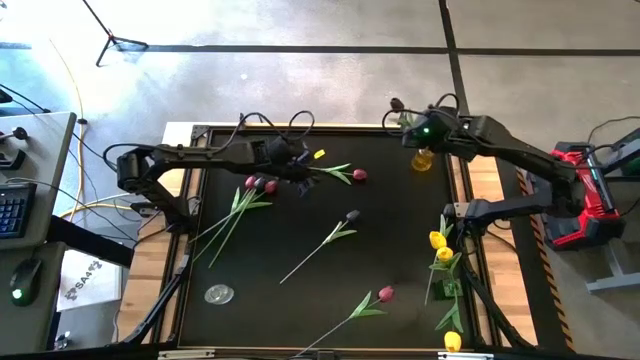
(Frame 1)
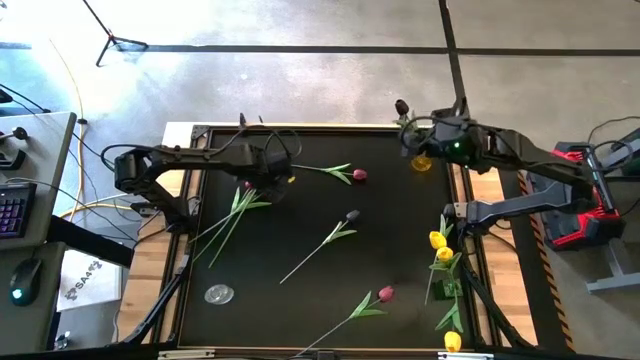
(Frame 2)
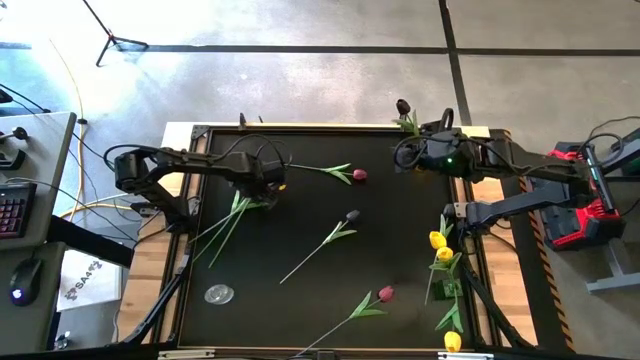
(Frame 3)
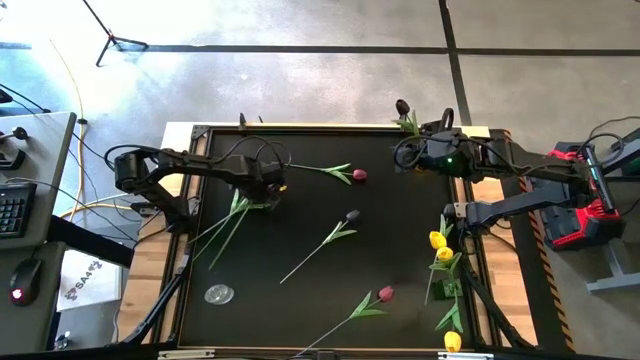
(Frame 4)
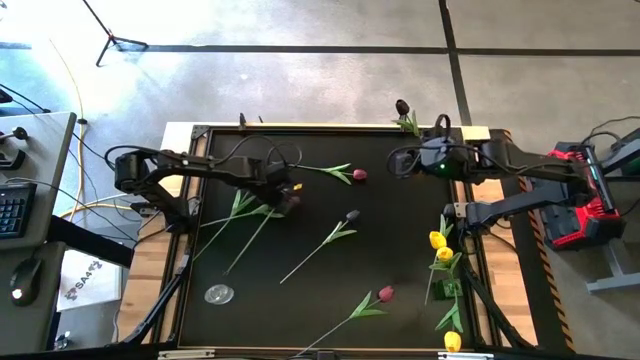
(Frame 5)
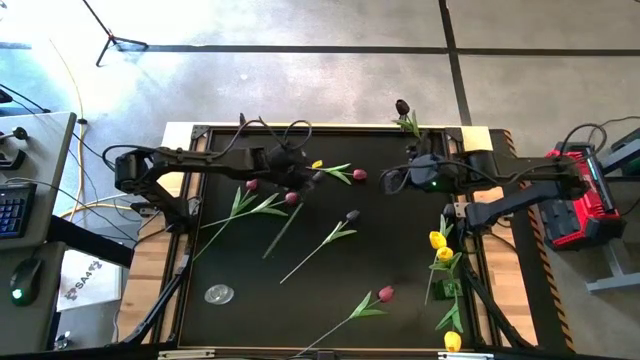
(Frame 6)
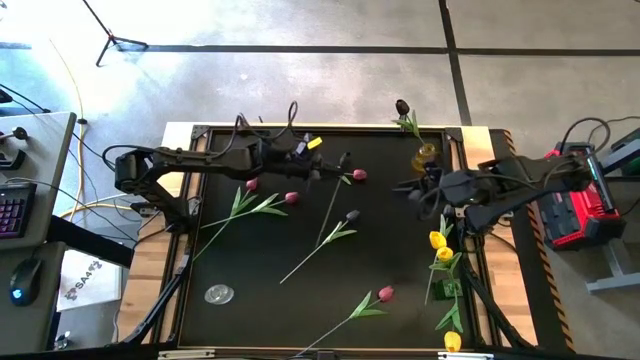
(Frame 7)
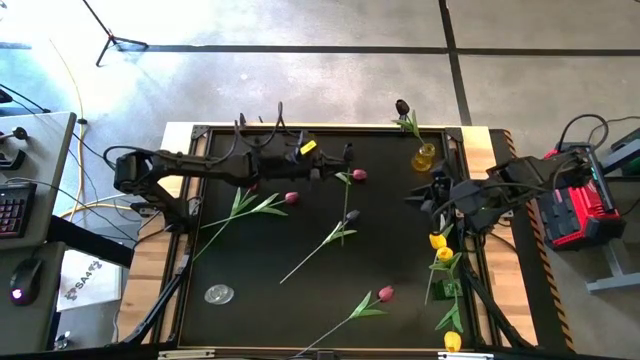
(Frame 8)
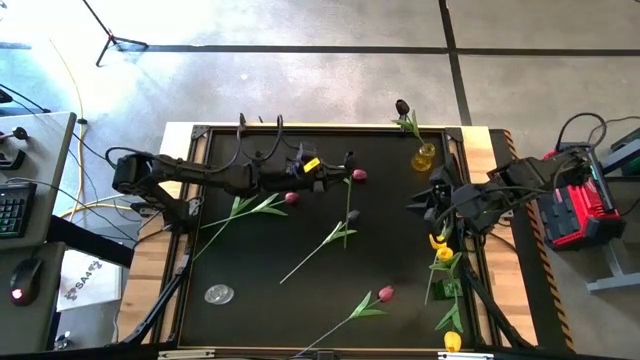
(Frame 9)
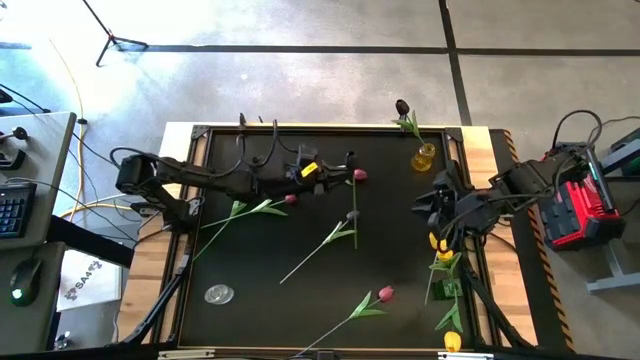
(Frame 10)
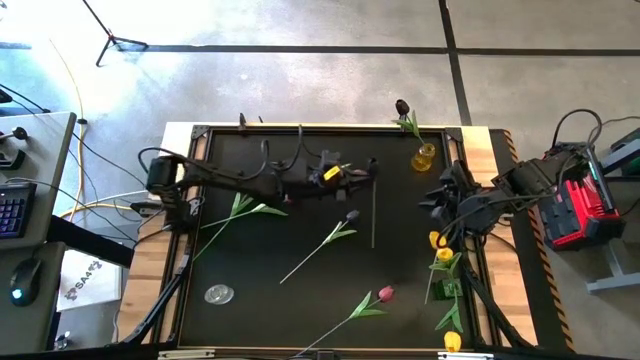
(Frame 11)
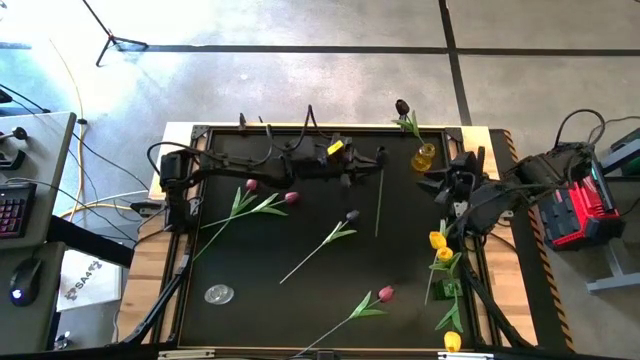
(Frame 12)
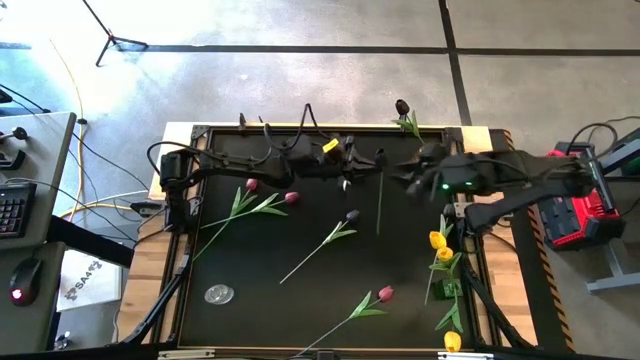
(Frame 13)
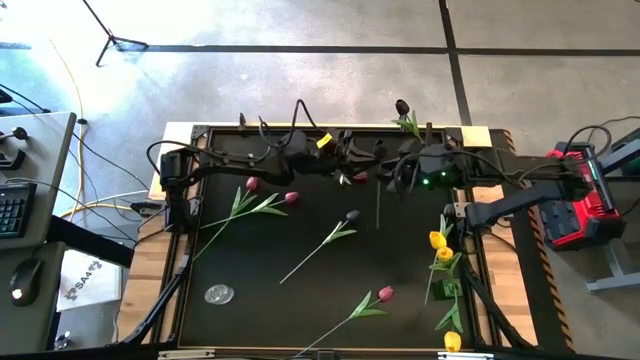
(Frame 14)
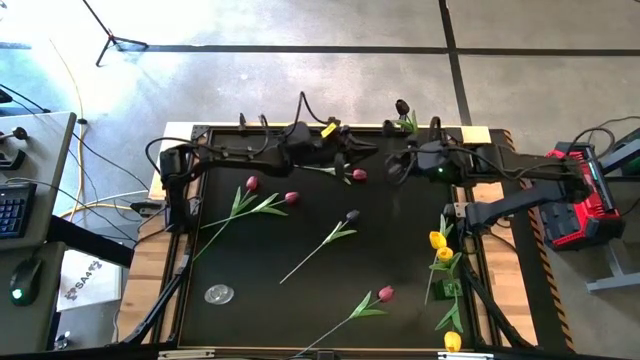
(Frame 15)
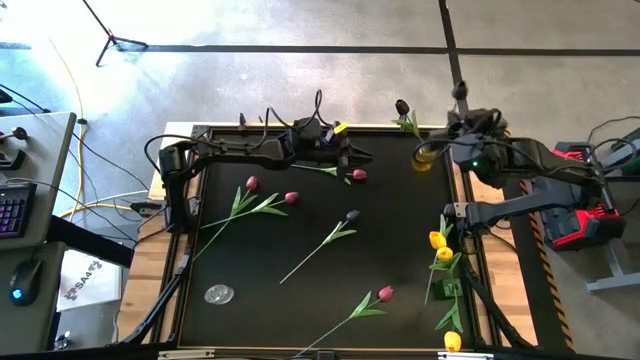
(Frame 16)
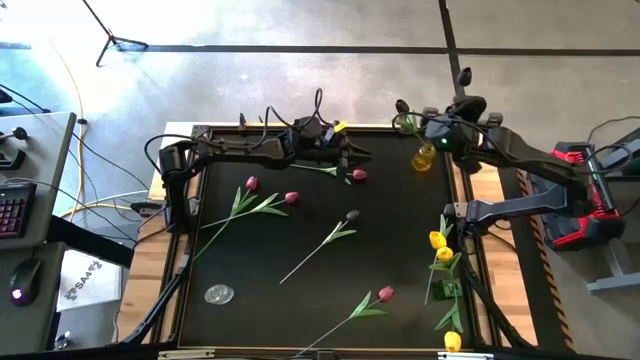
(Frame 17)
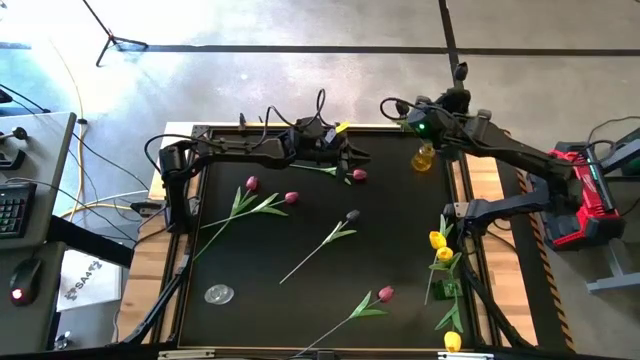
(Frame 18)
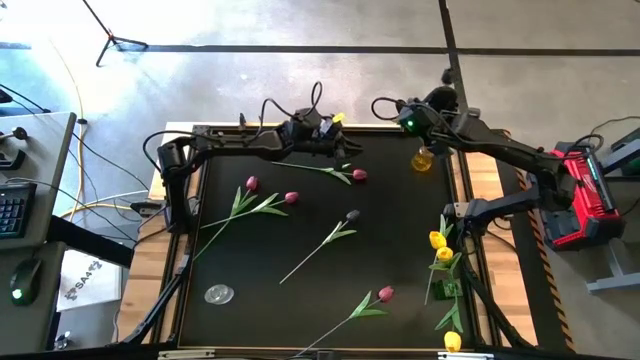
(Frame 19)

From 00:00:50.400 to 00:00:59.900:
Task: Sort flowers into vase by color
Put the middle left black flower into the yellow vase

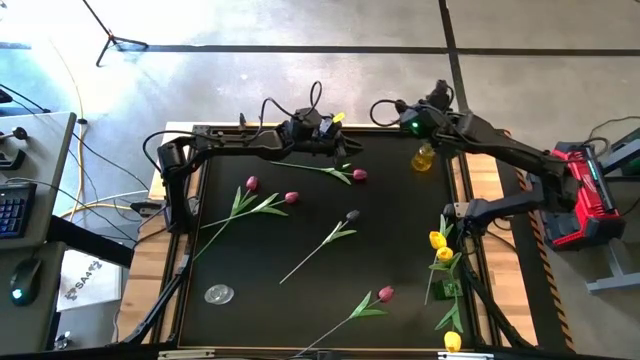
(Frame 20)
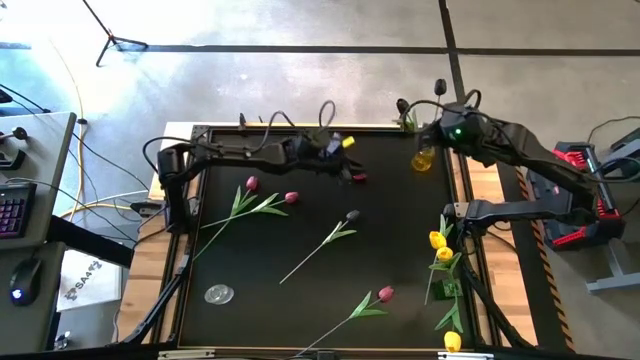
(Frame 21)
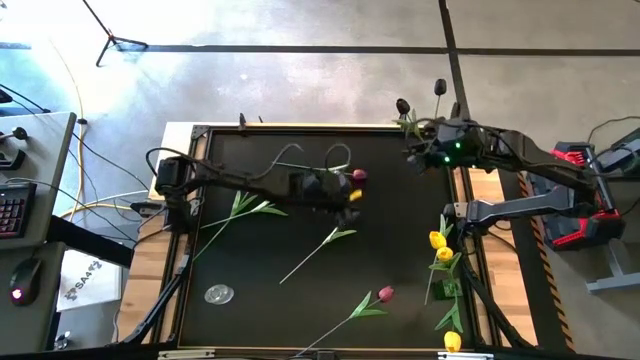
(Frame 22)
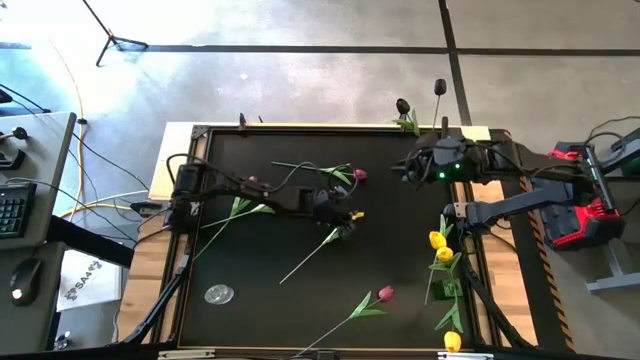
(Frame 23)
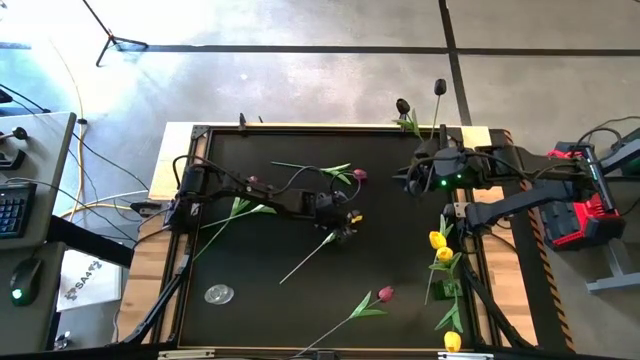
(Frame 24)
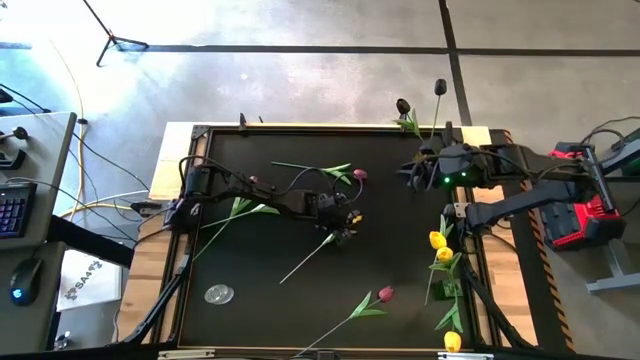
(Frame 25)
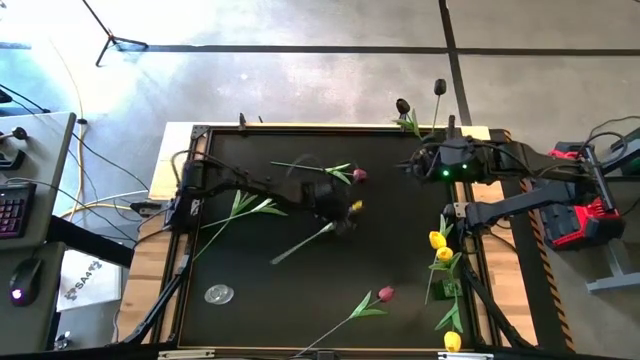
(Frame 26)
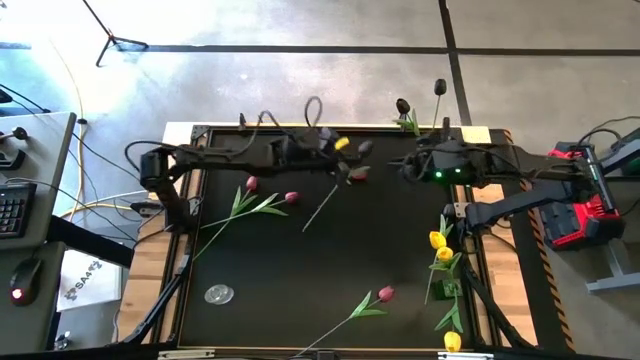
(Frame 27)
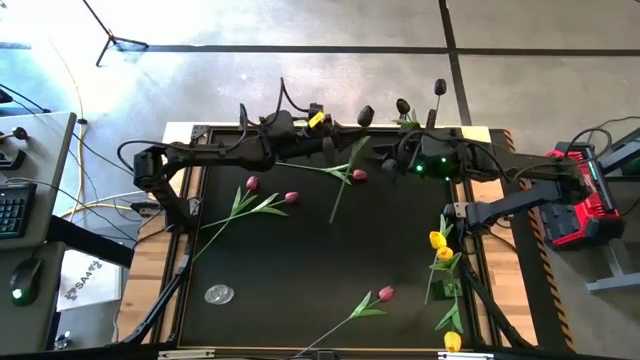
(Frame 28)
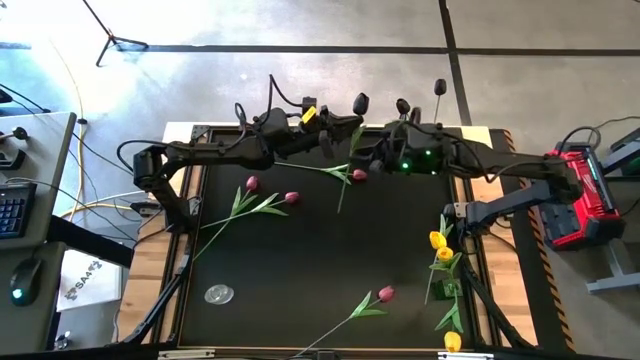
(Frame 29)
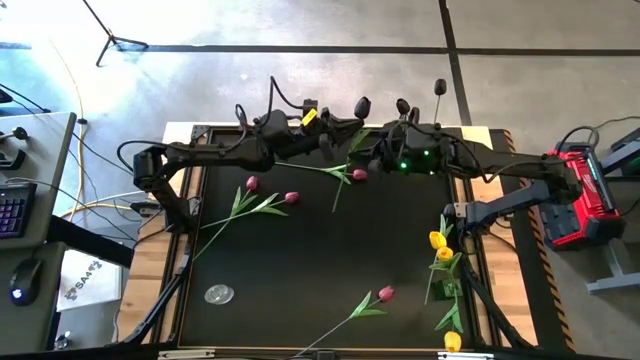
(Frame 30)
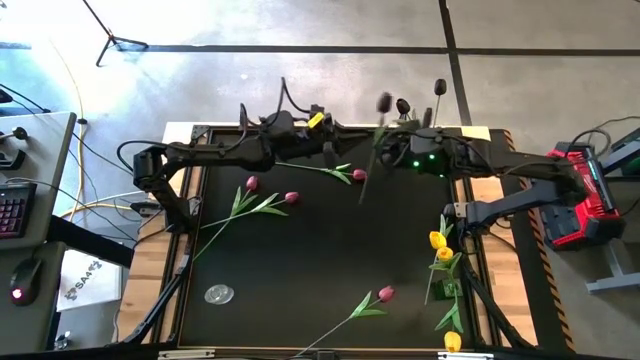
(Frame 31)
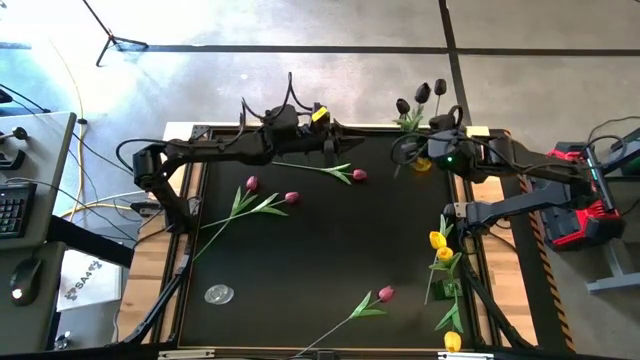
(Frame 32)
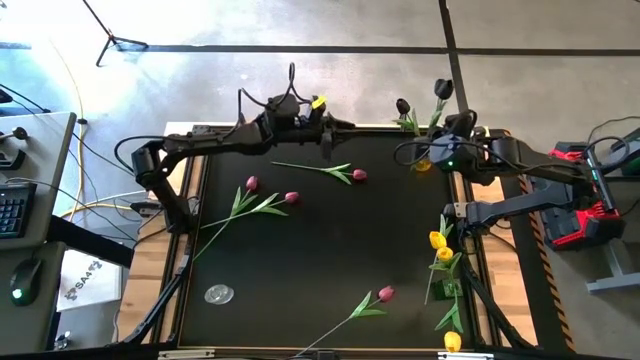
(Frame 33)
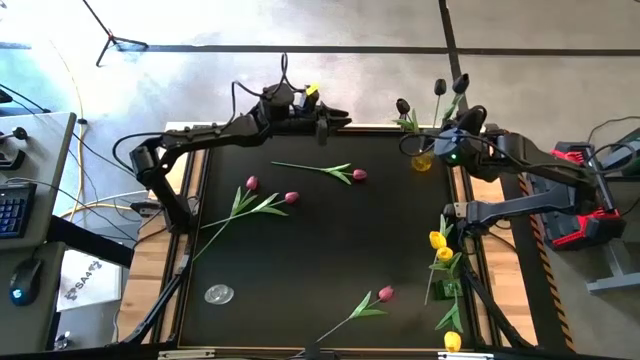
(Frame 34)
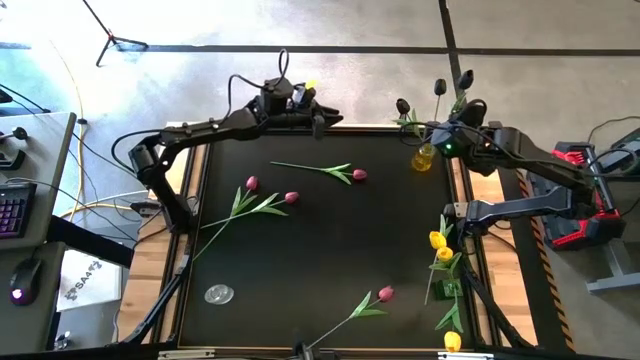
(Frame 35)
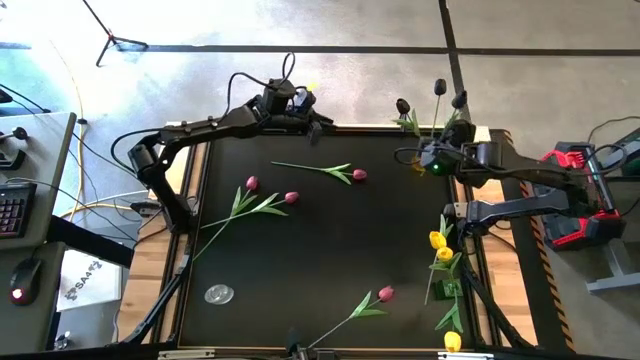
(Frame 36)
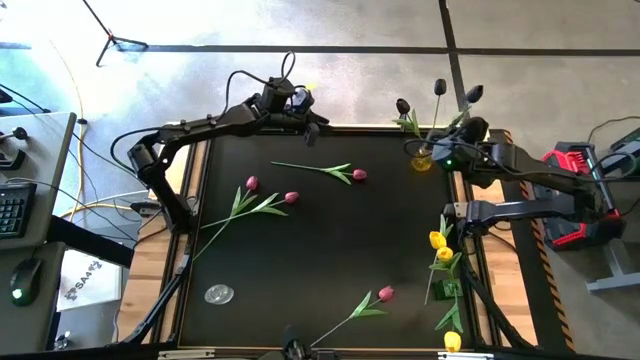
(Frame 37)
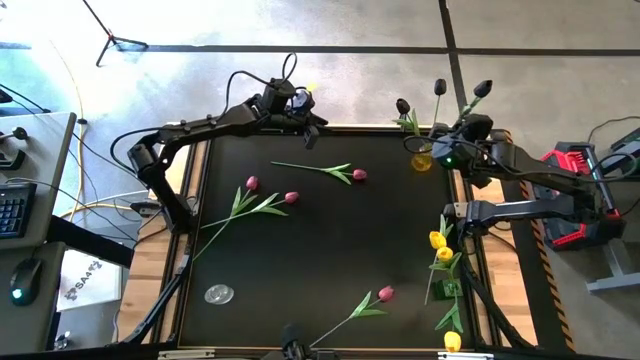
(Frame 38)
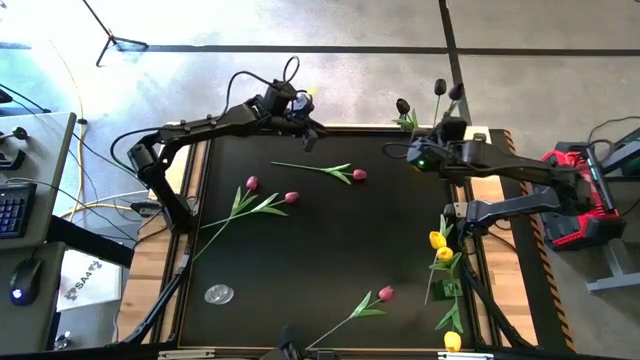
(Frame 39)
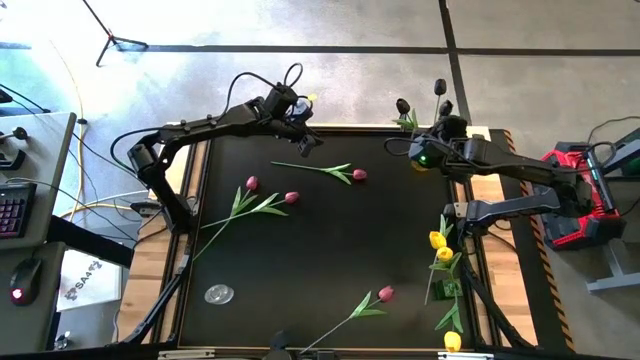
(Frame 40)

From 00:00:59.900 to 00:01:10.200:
Put the left black flower into the yellow vase
